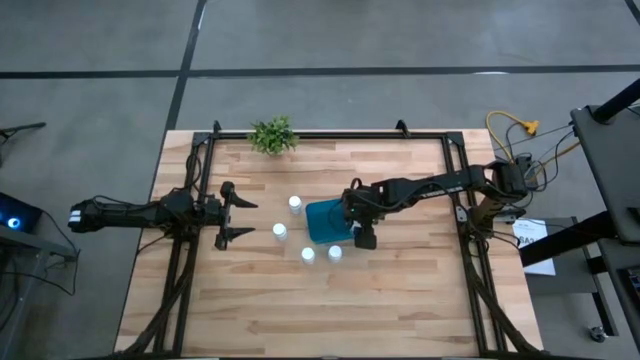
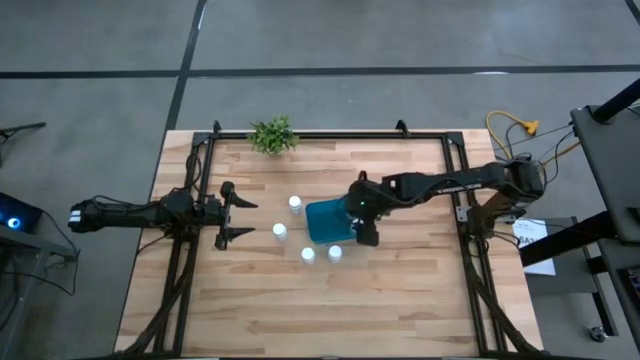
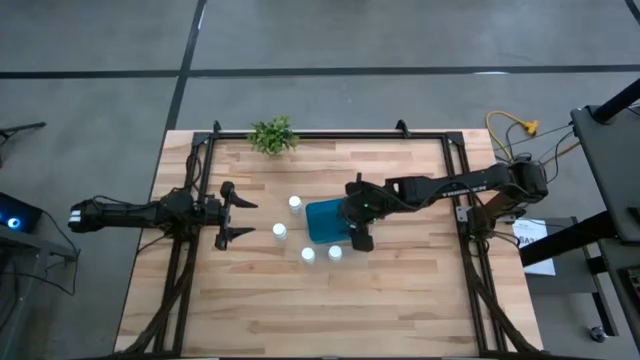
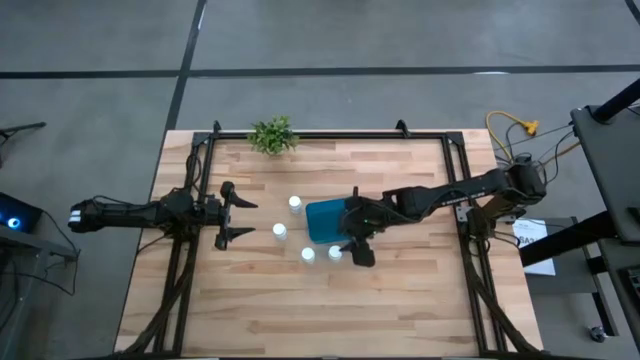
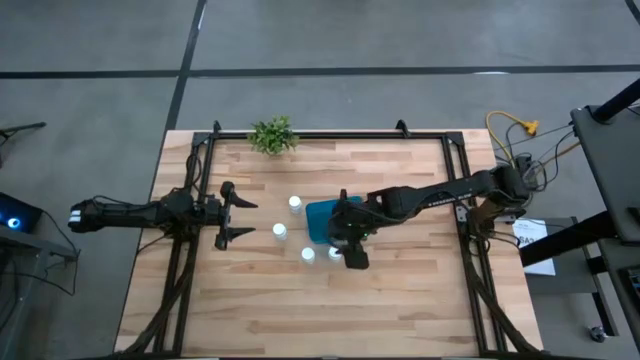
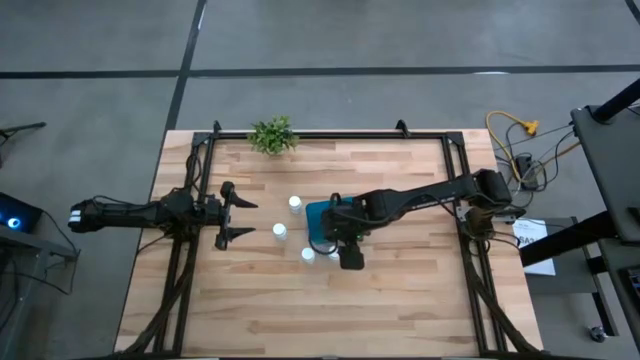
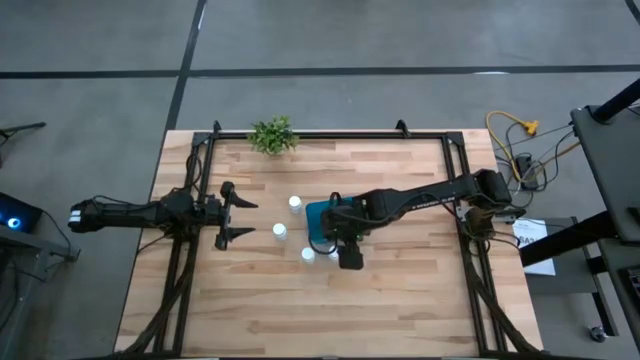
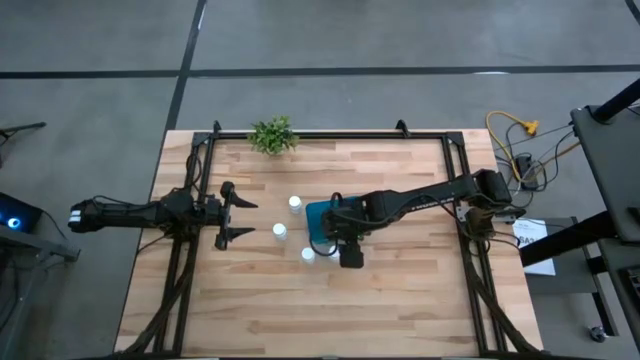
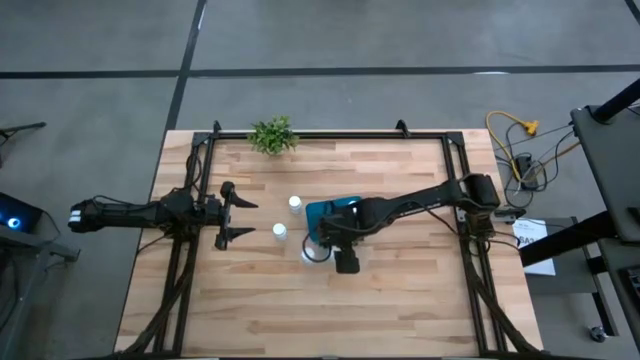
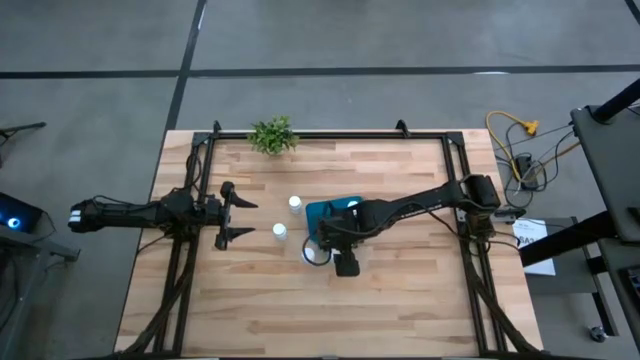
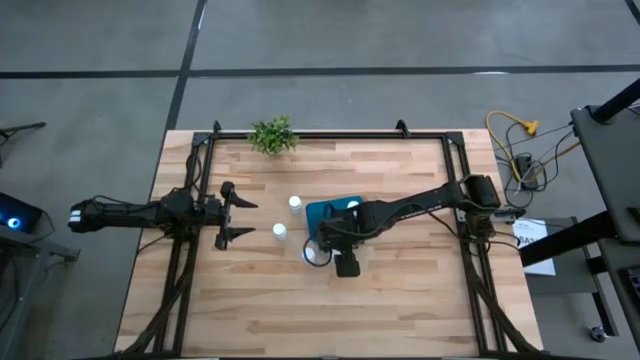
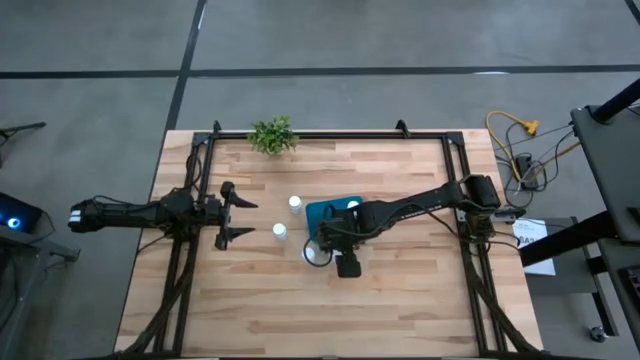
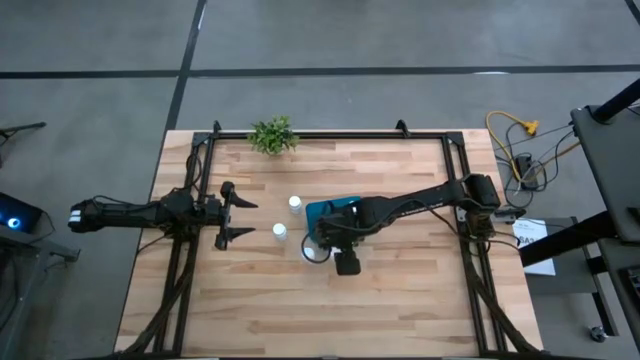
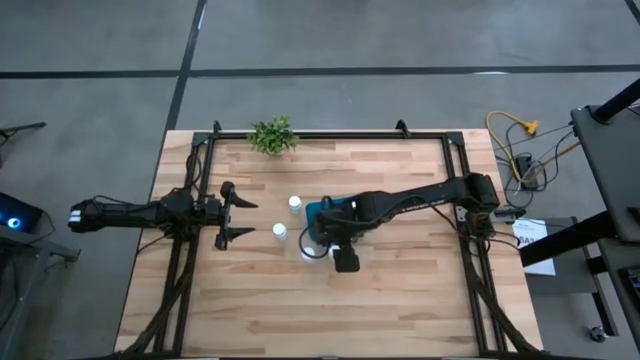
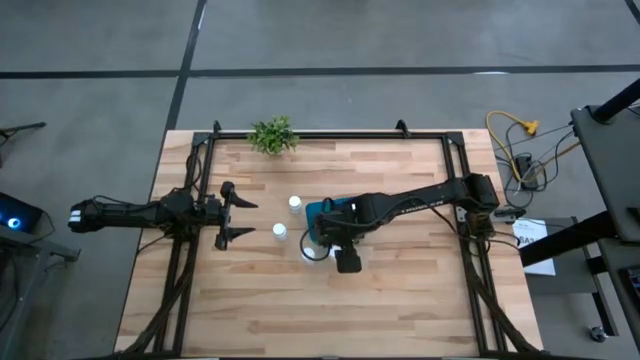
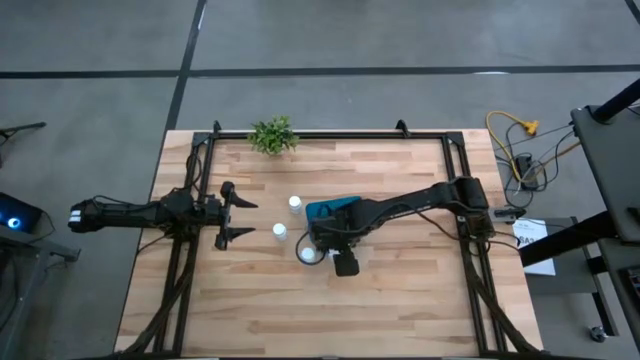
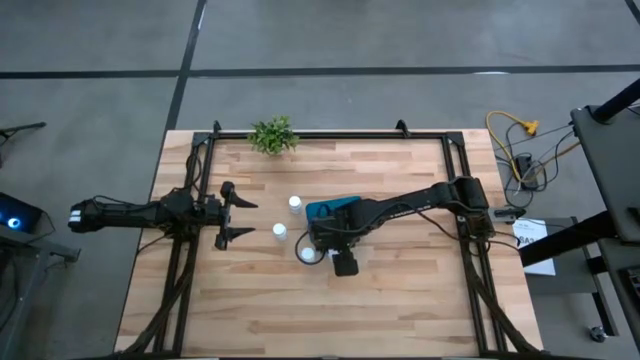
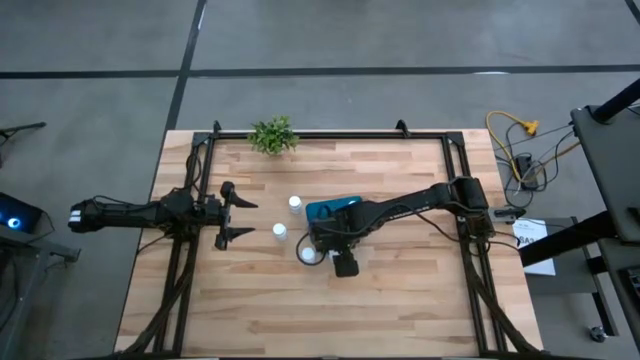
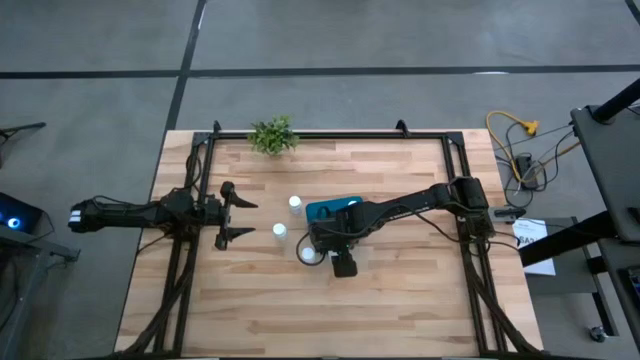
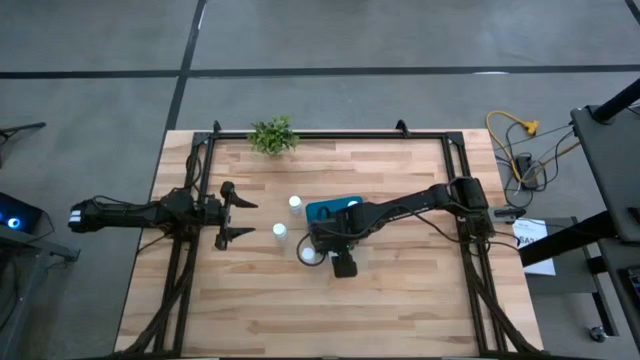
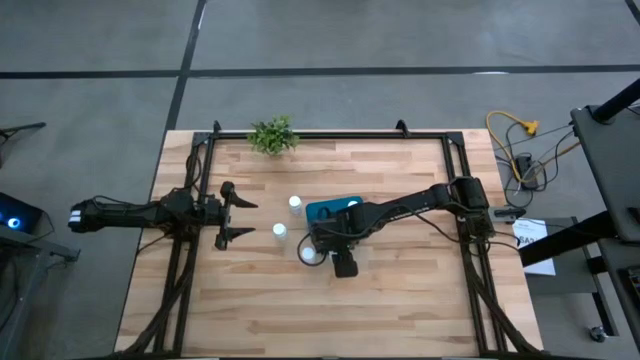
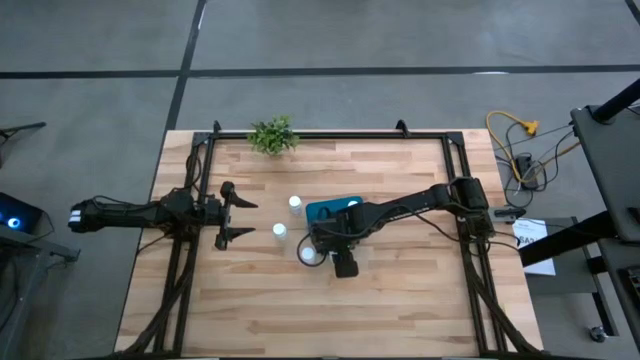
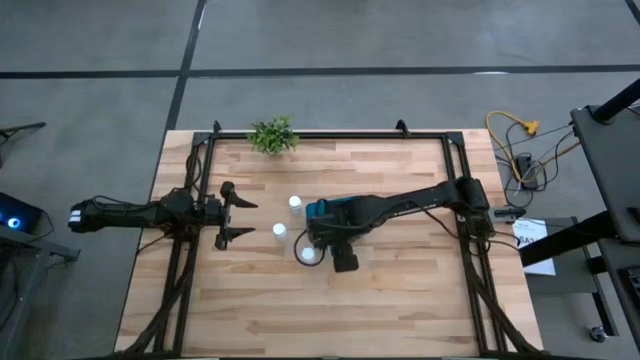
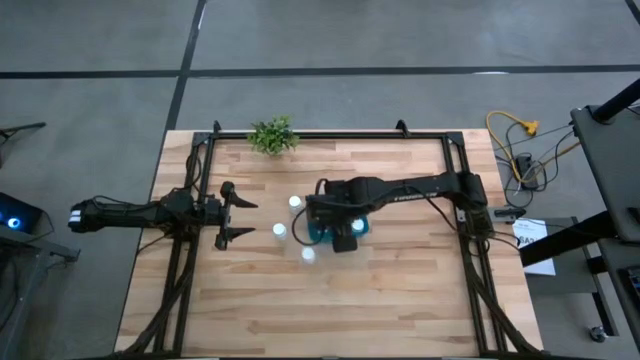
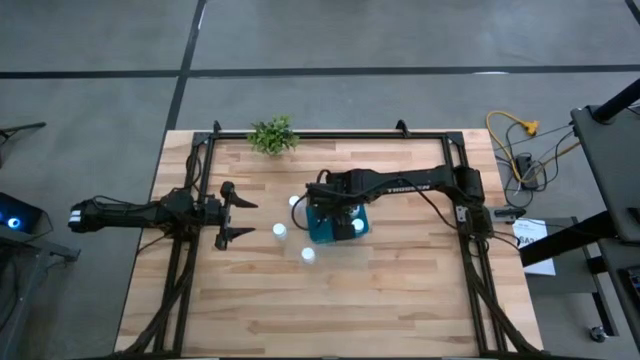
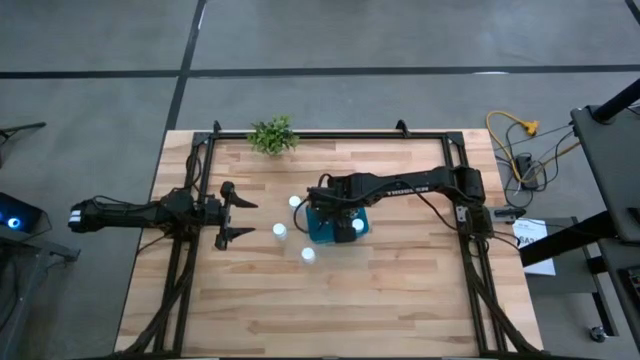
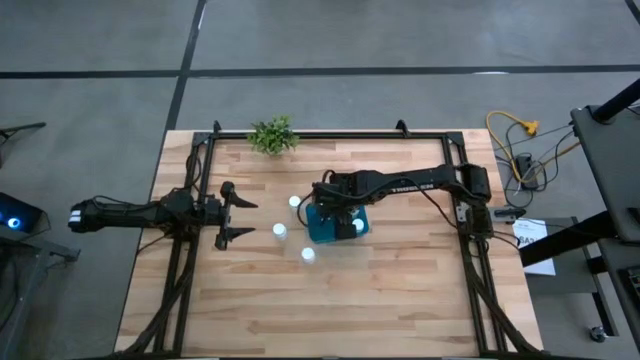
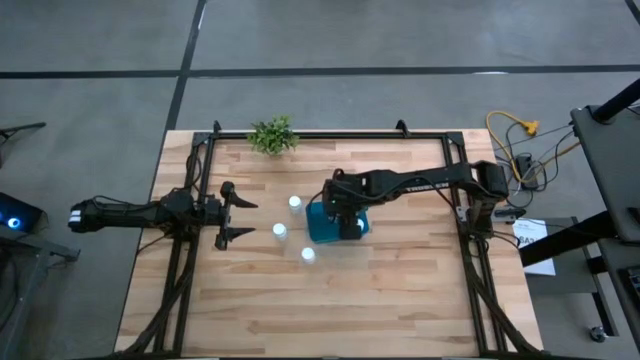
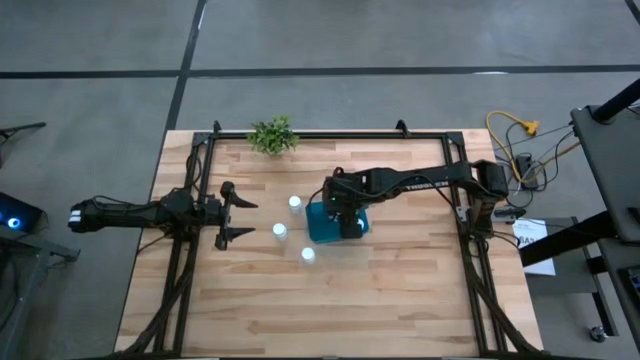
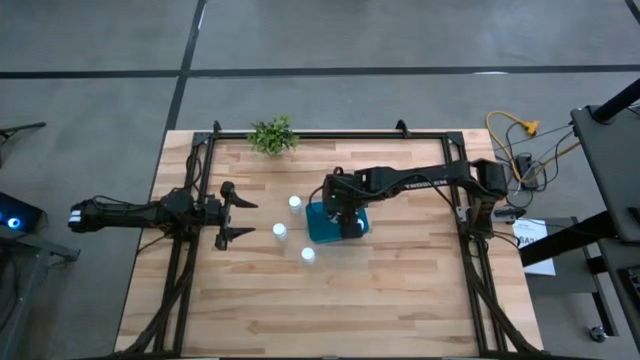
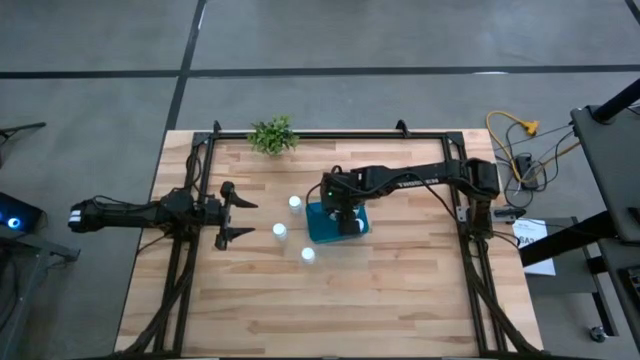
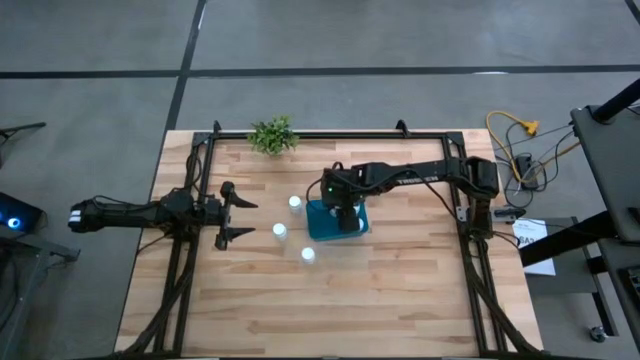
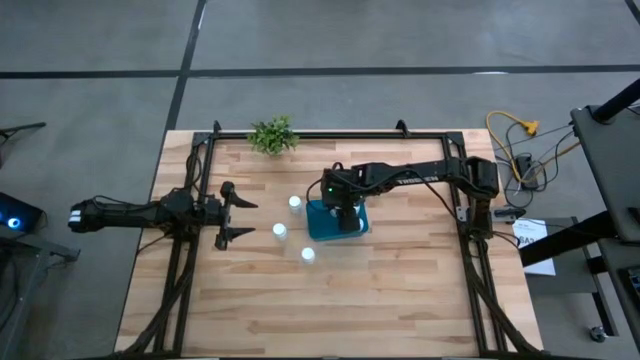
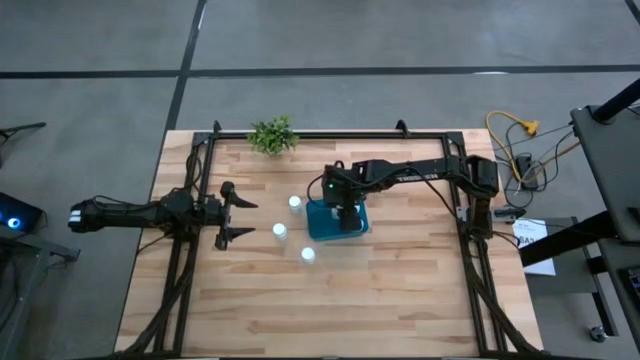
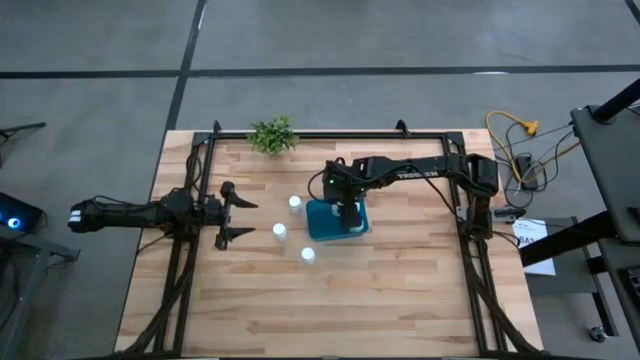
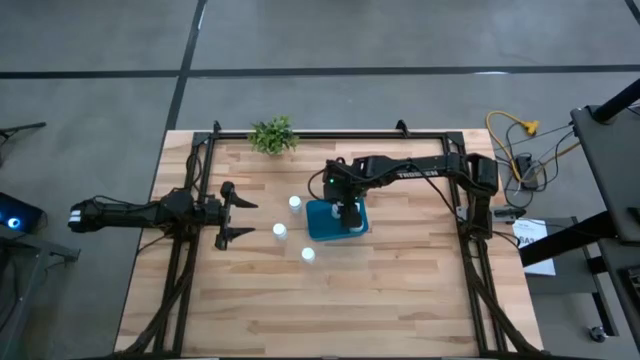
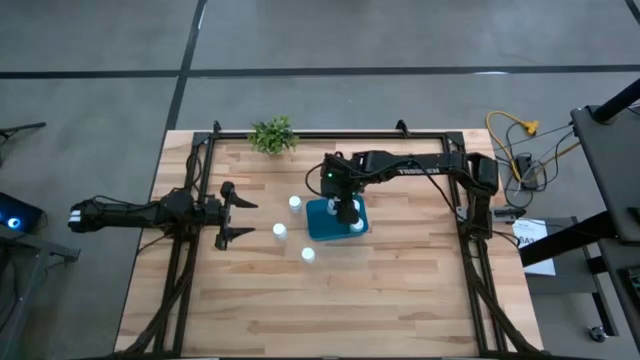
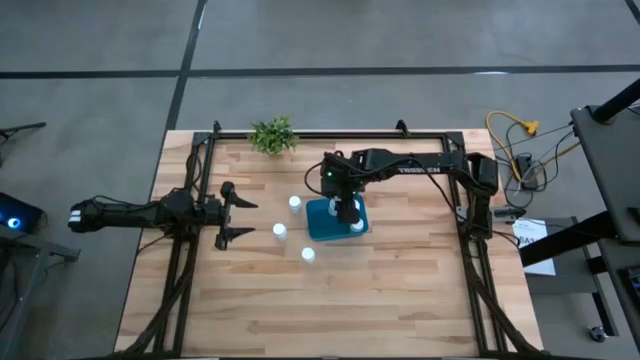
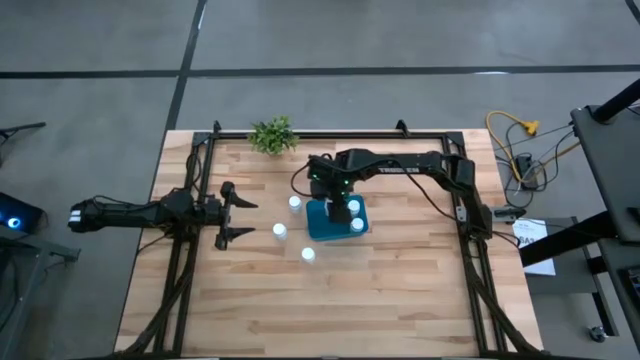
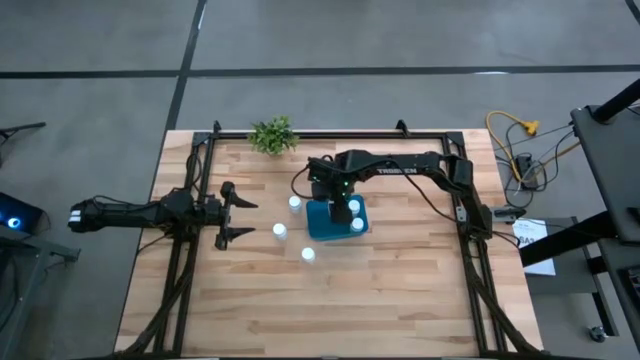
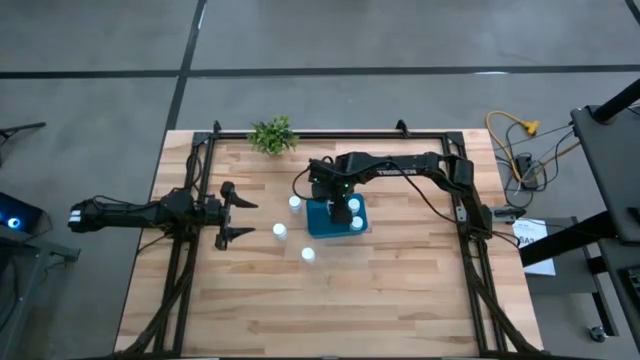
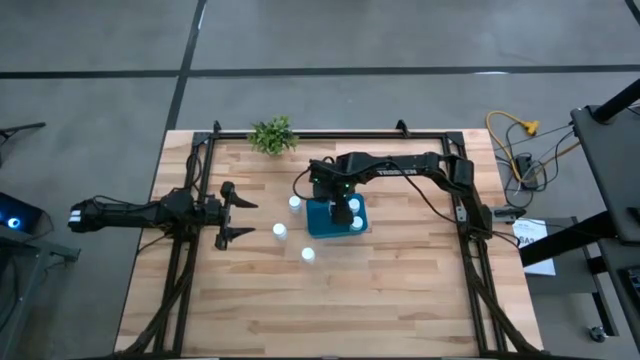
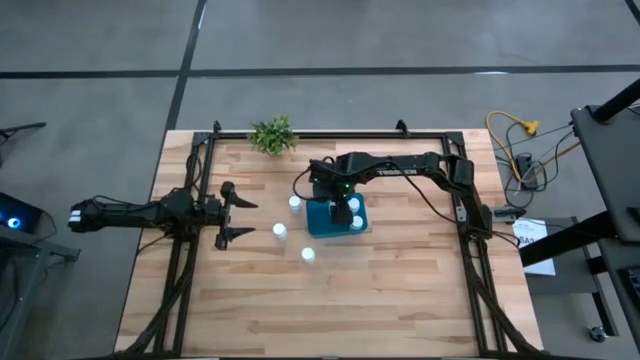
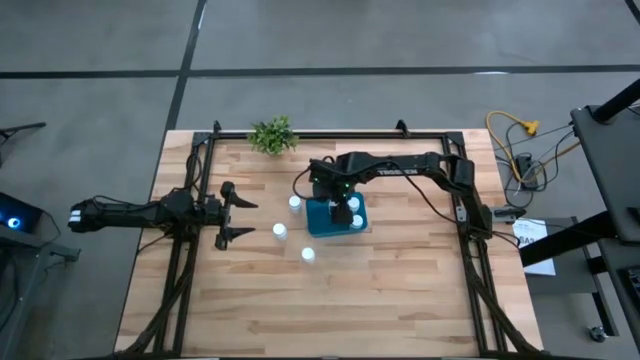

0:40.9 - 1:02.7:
Task: Pick and place pill bottles into a basket
Put the white medicine bottle into the blue bin
